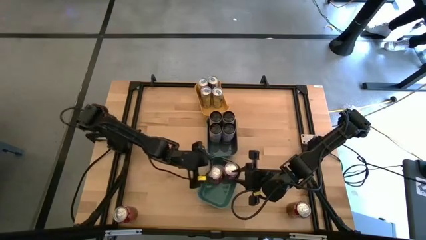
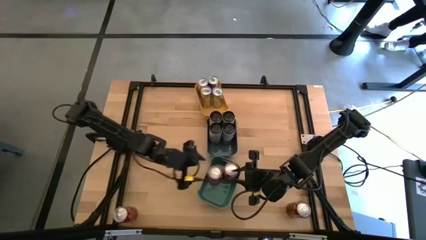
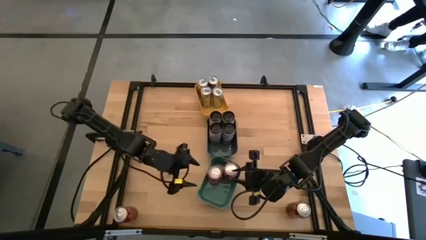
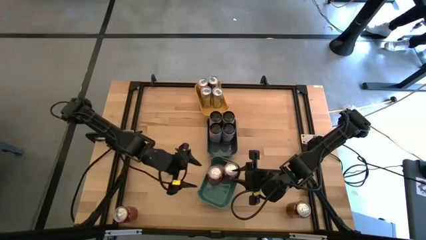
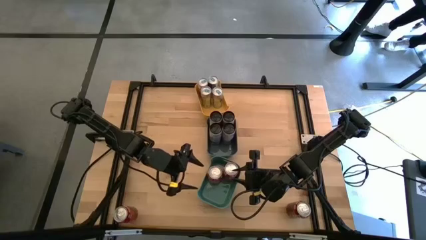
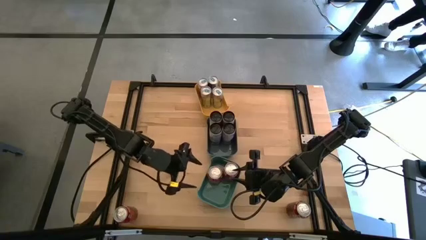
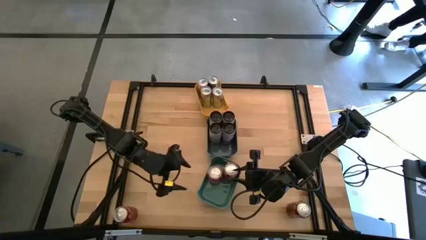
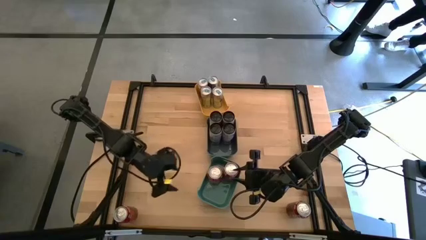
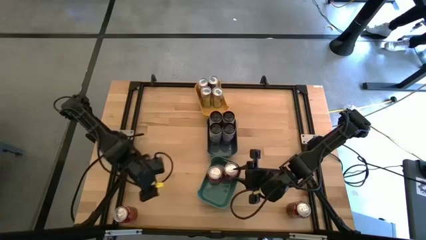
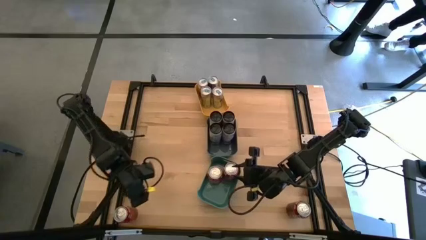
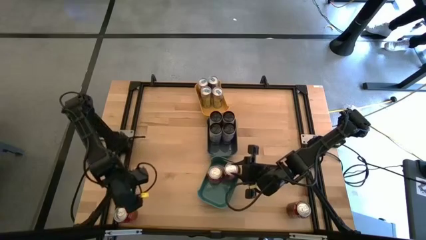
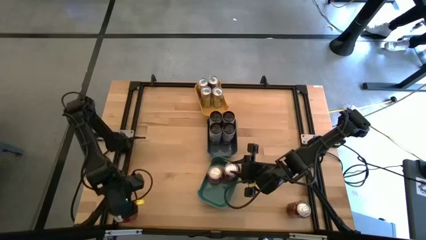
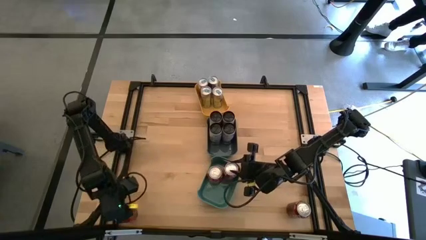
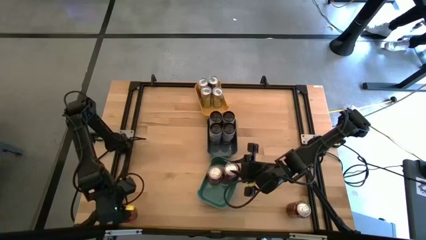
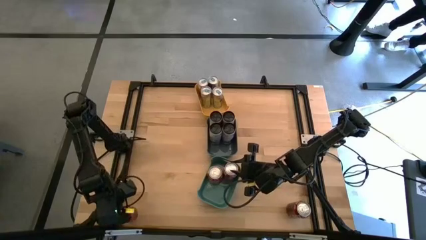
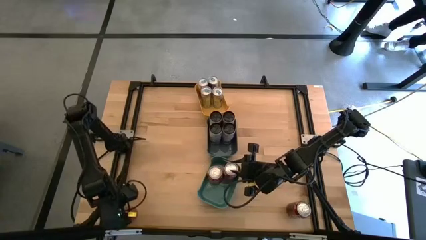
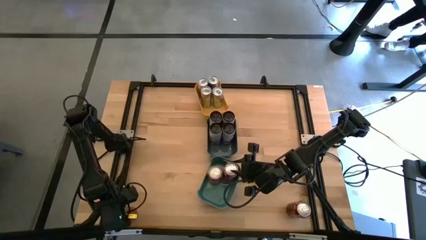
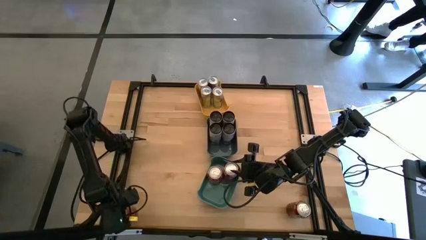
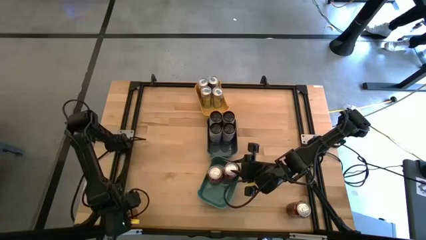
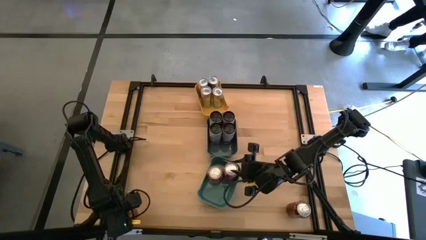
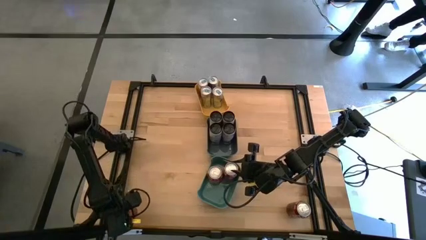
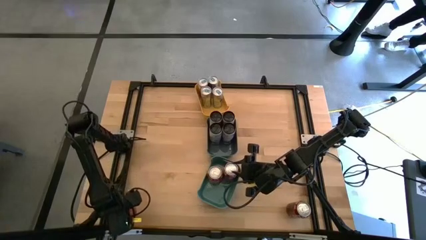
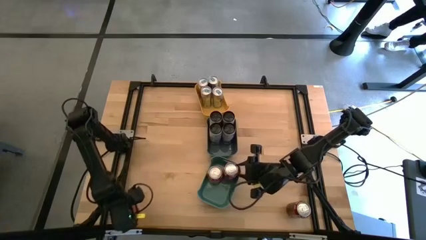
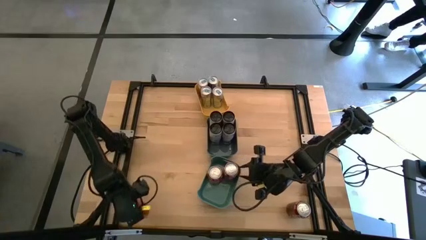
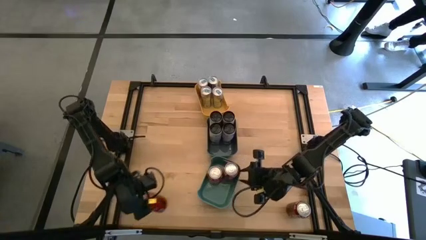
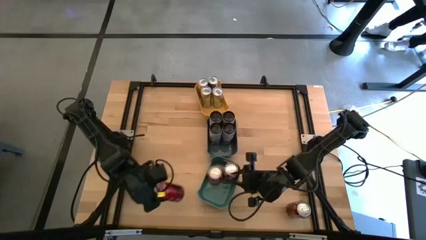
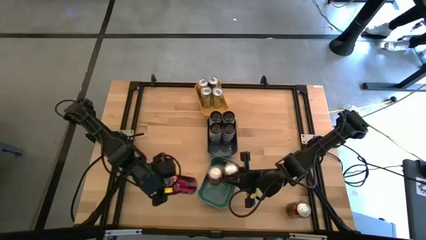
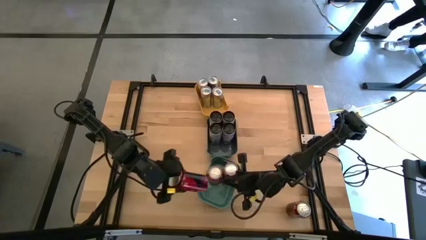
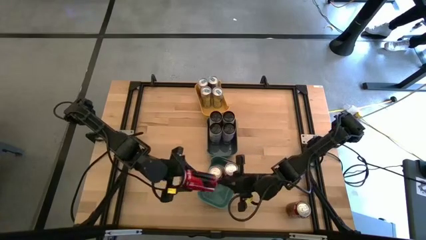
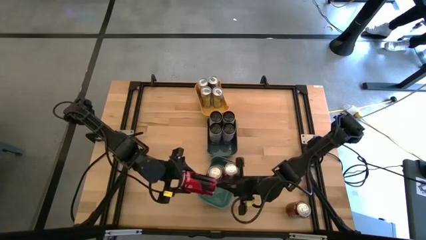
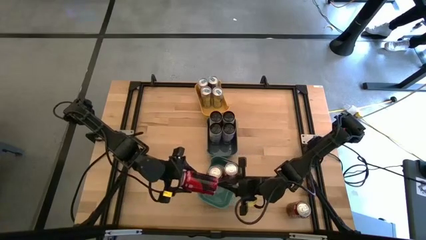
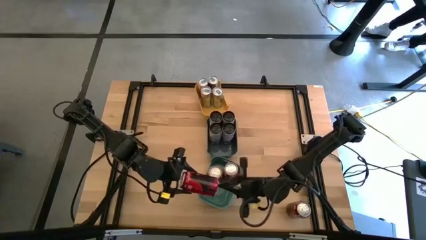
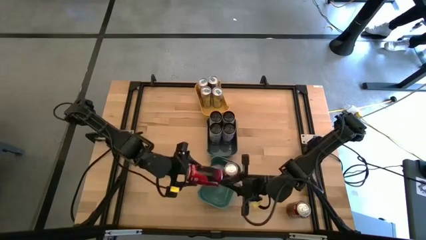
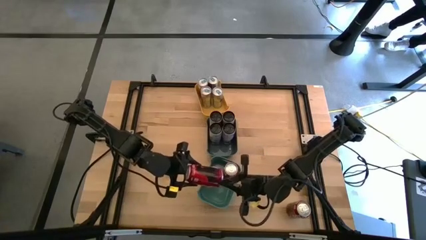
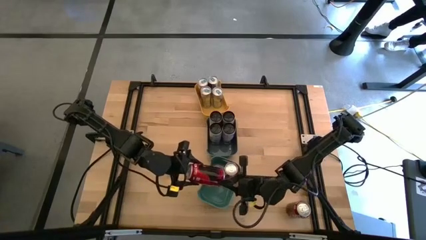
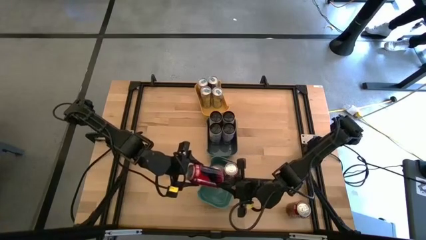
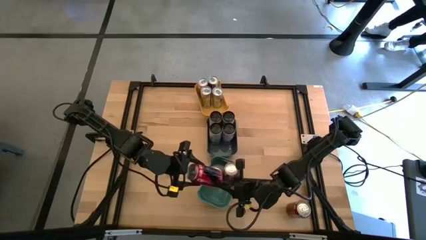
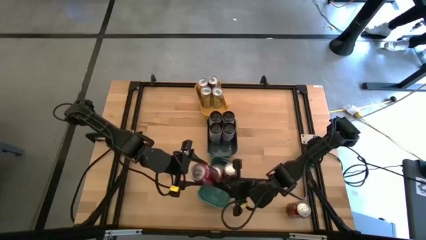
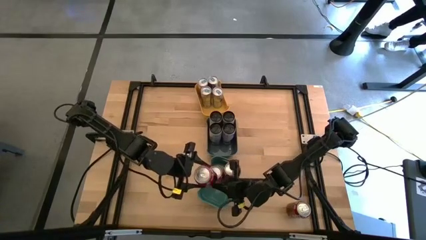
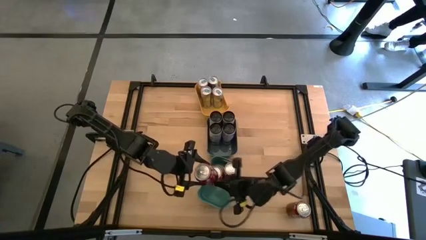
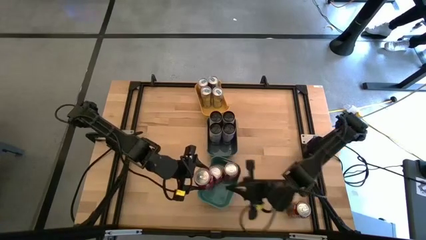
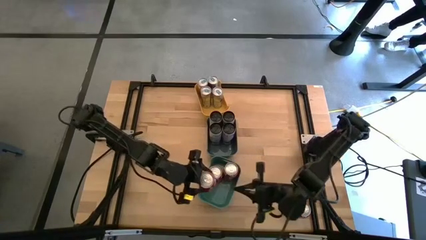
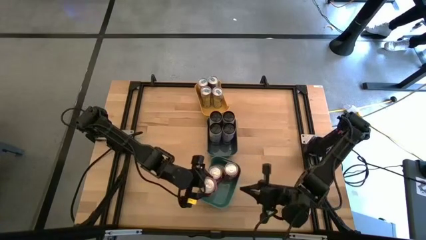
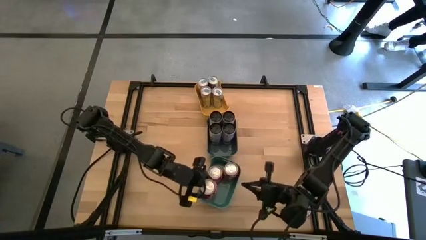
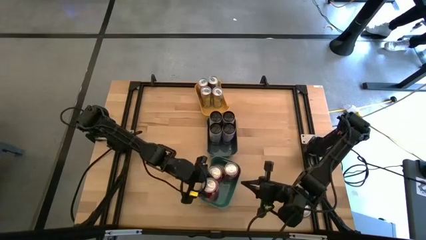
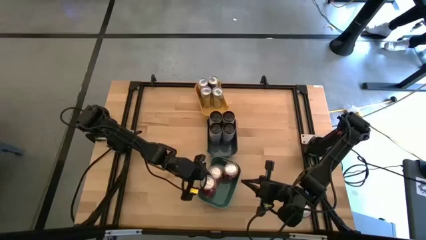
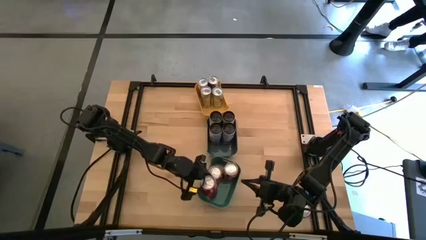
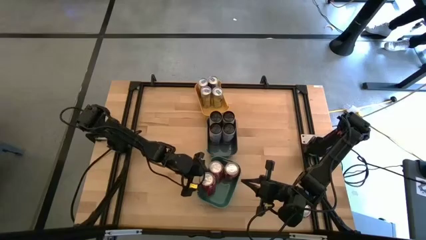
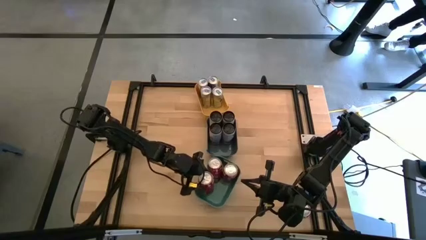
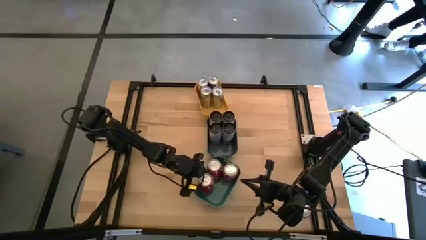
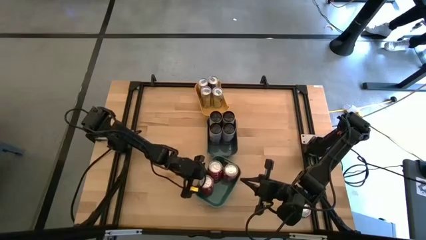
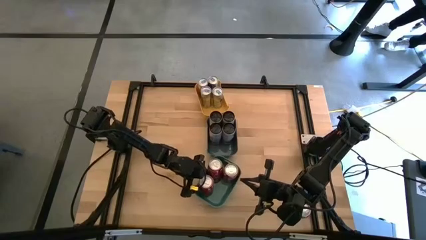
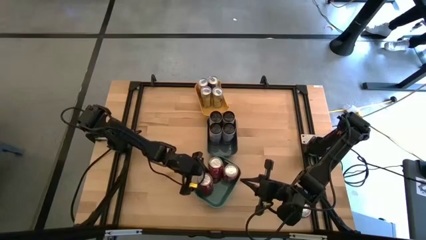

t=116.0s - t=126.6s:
Task: Sort soda cans
Put the left red soda can into the green bin

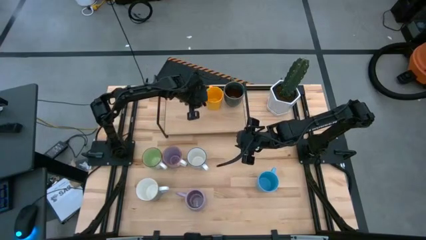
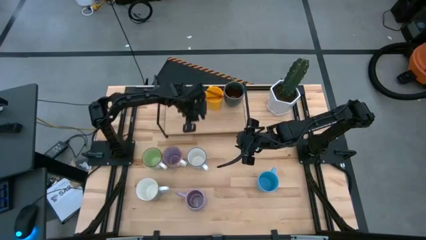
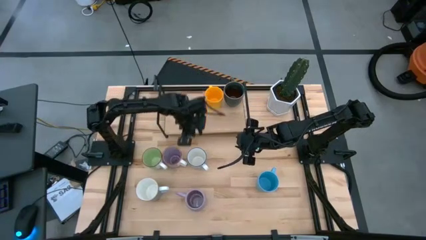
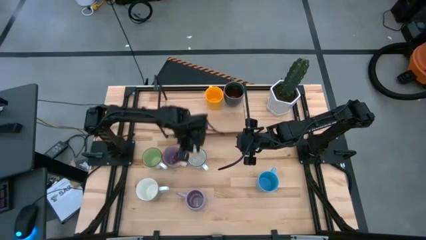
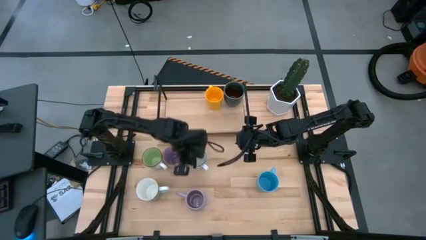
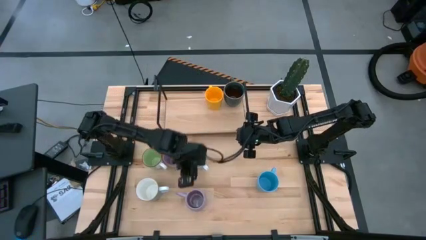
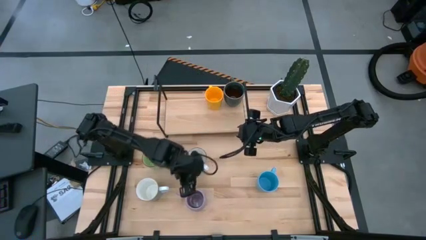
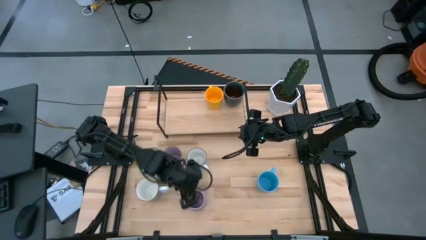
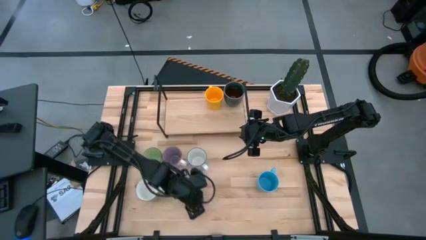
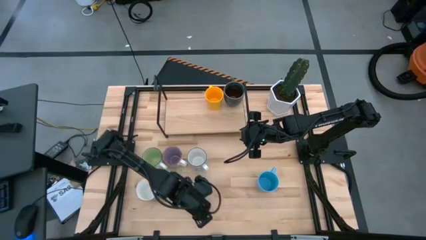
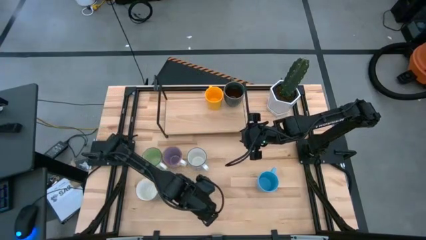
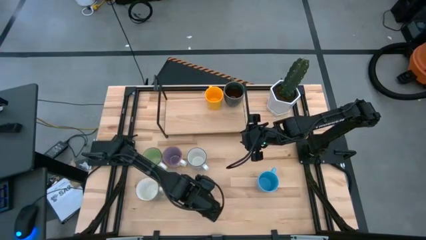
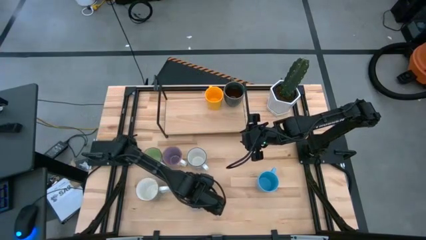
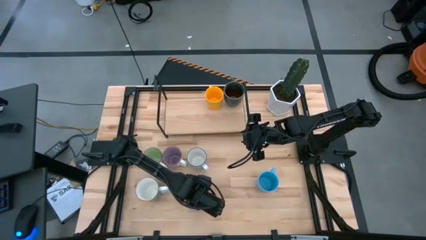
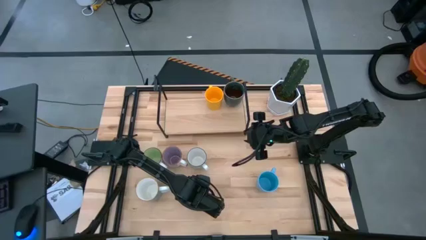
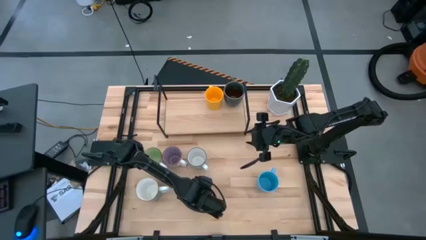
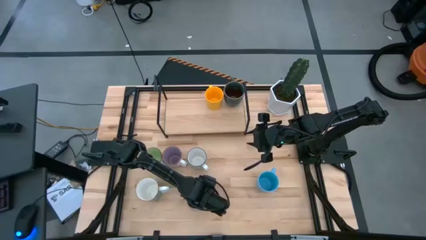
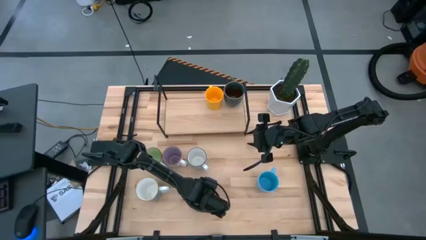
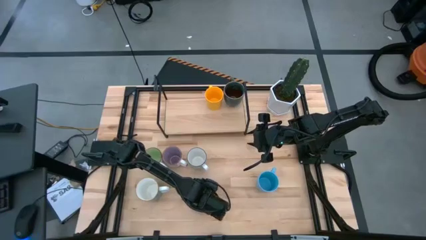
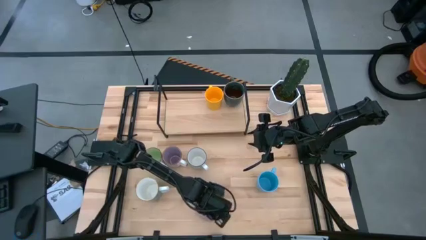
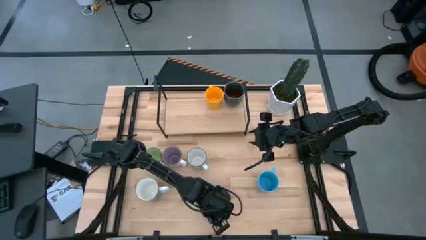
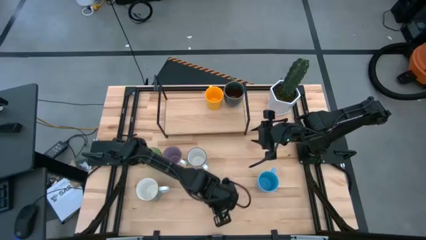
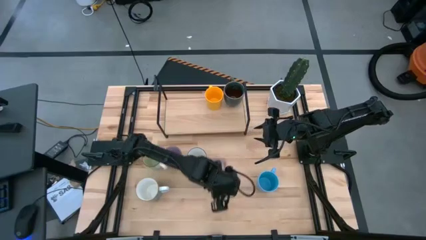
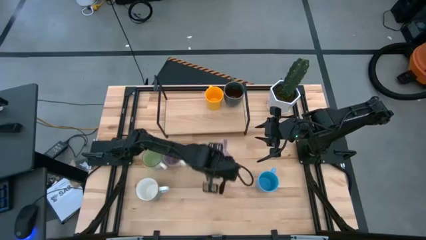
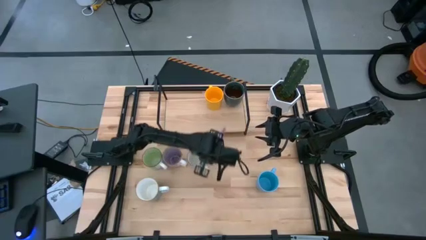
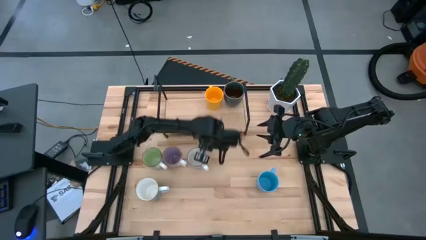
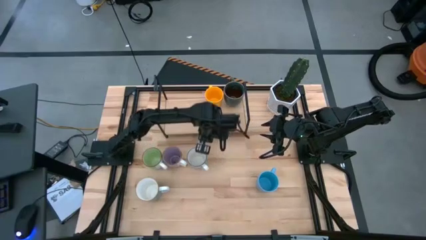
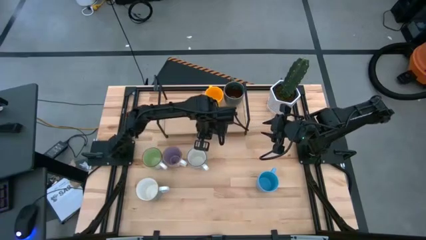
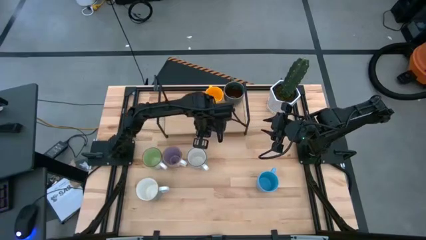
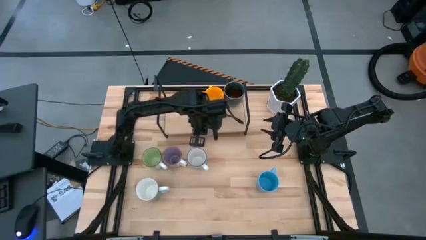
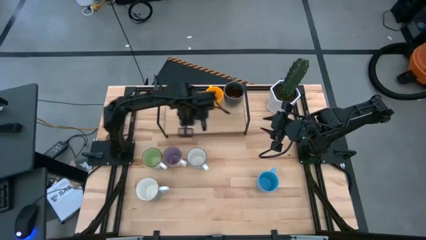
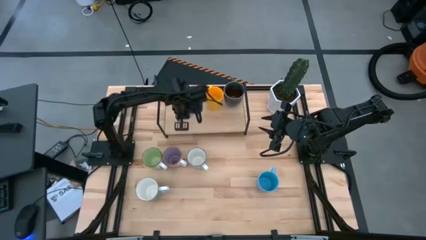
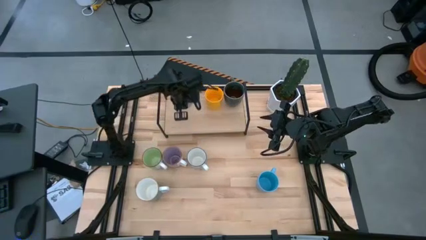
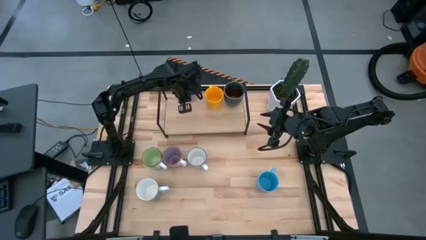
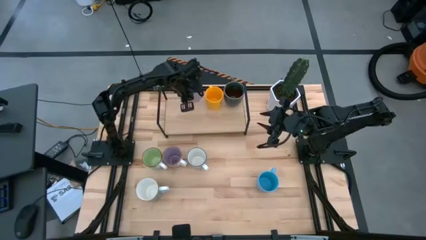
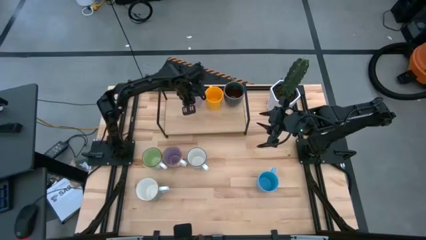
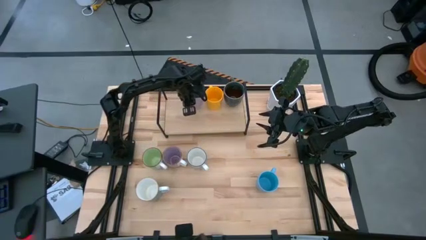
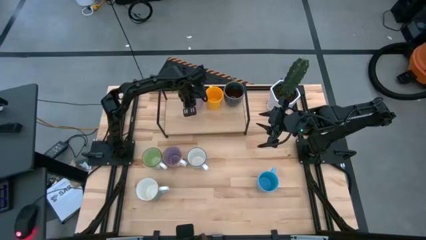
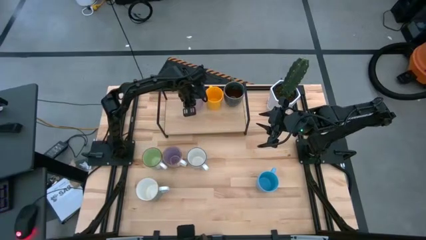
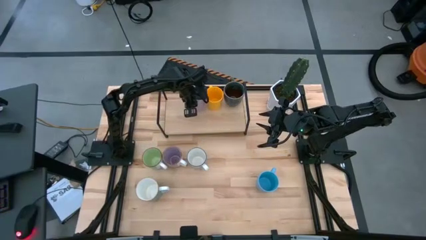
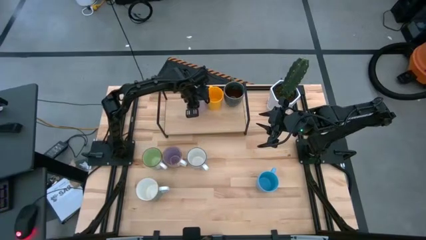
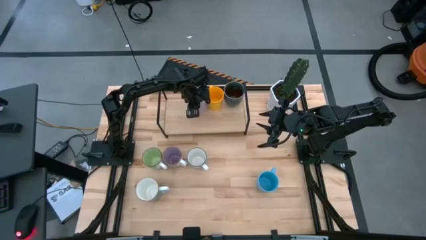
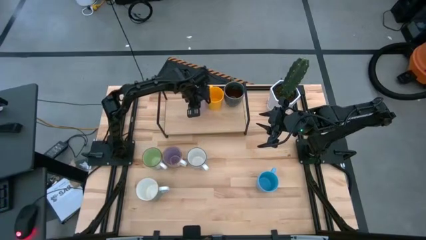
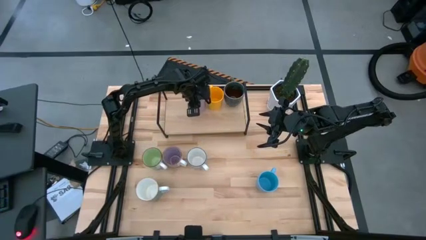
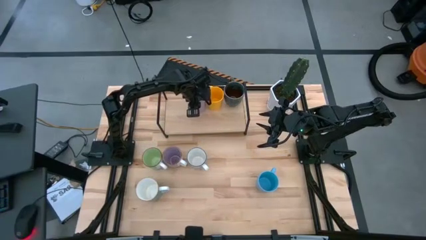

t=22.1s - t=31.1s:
Task: Place coffee mugs
Put the purple mug on the shelf
